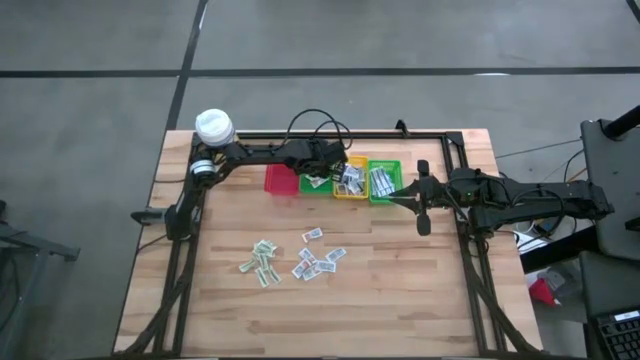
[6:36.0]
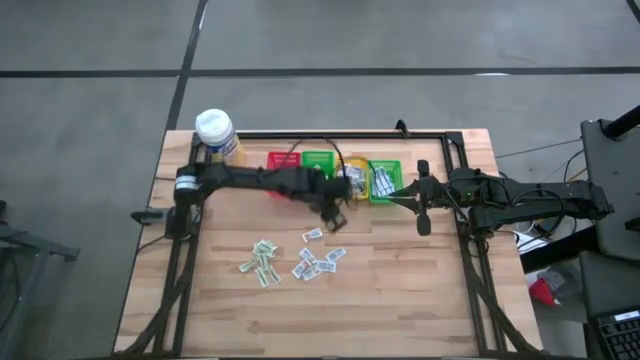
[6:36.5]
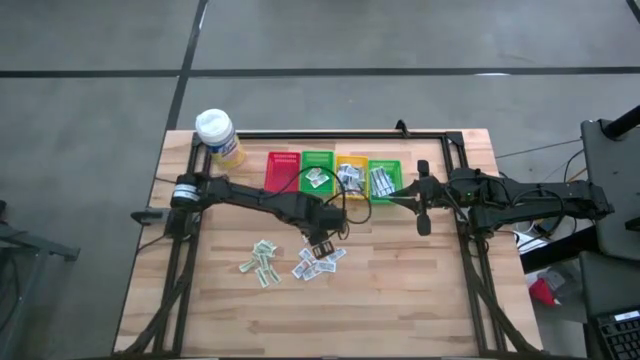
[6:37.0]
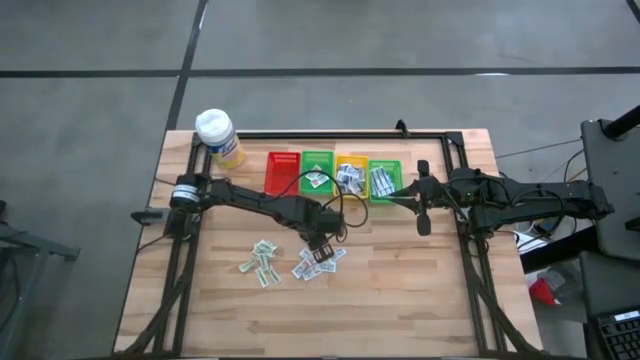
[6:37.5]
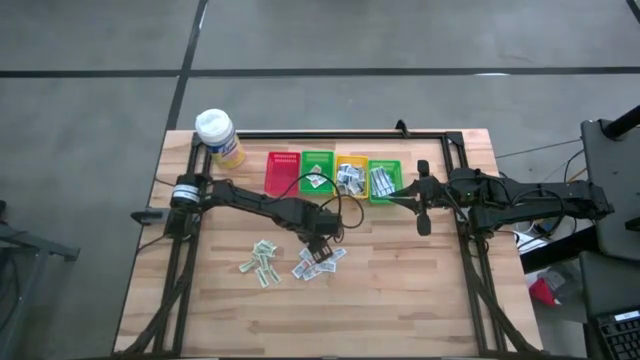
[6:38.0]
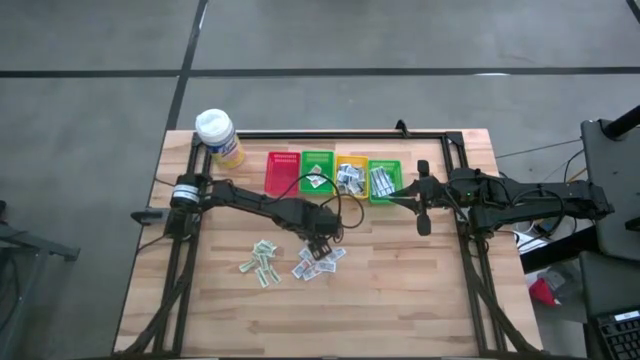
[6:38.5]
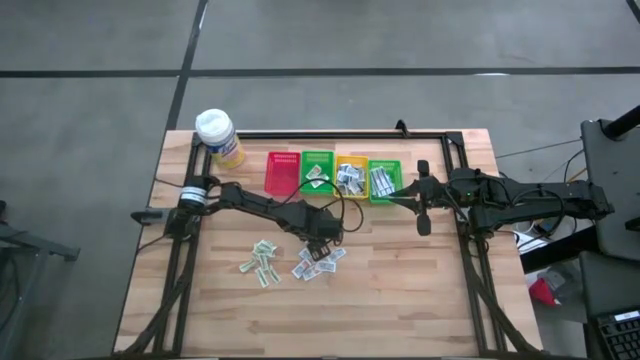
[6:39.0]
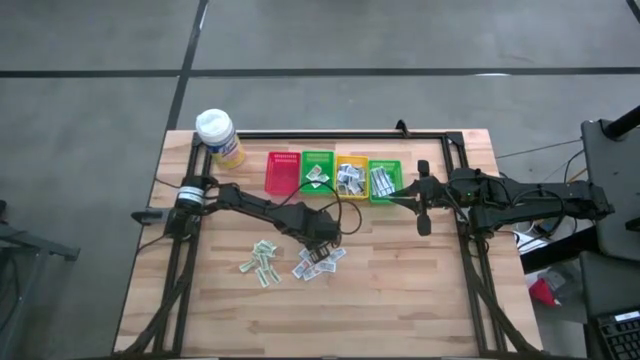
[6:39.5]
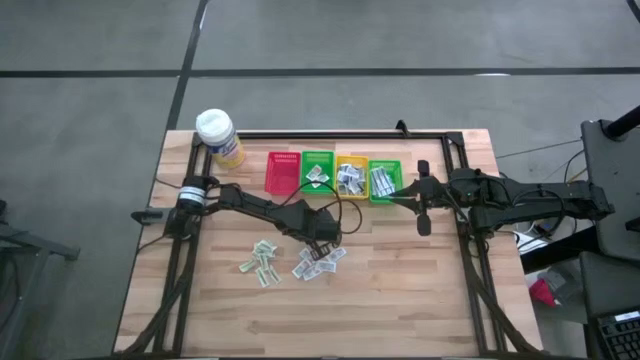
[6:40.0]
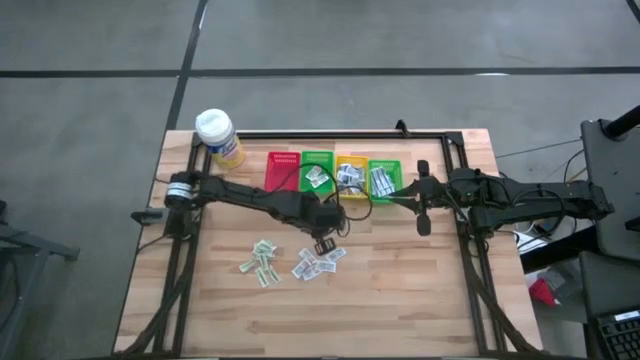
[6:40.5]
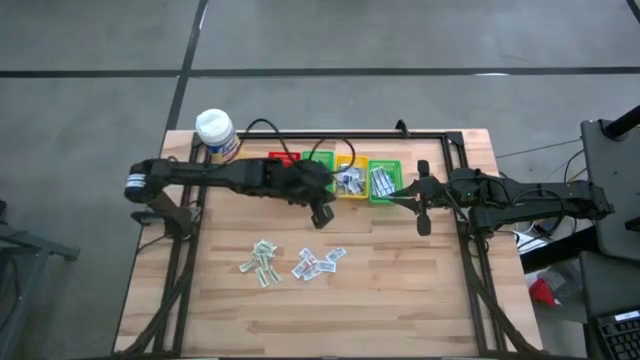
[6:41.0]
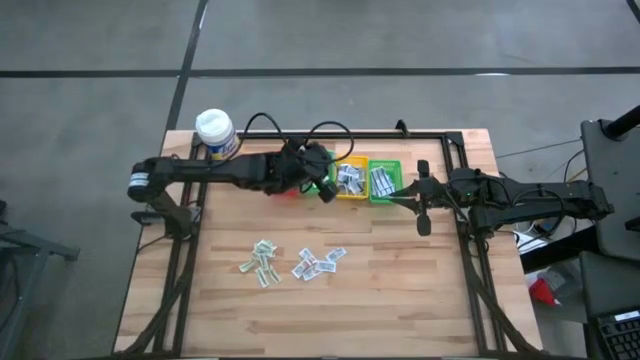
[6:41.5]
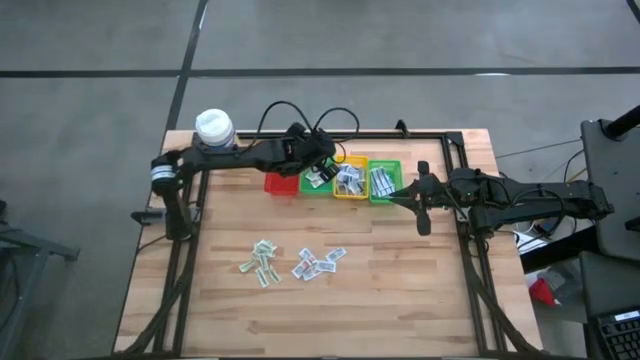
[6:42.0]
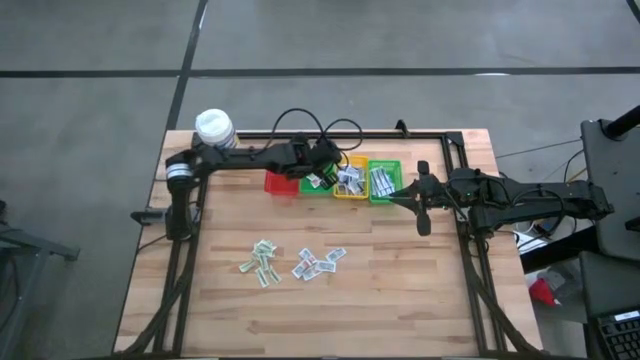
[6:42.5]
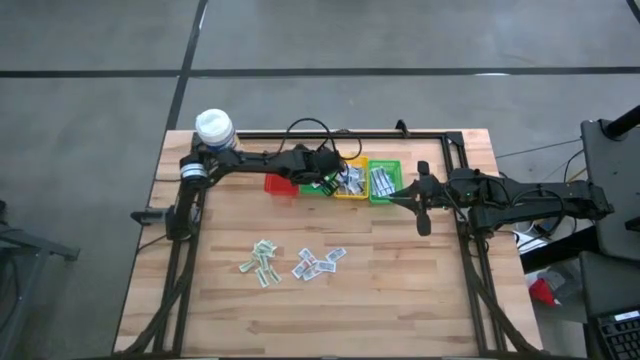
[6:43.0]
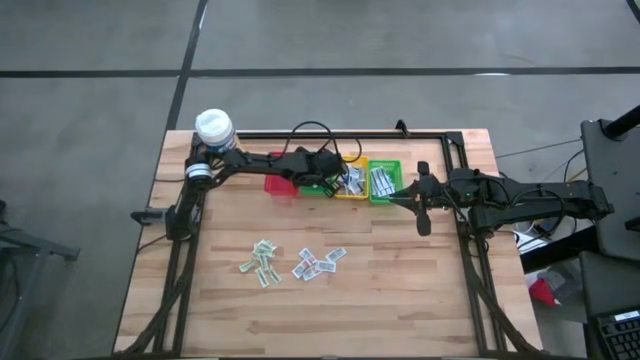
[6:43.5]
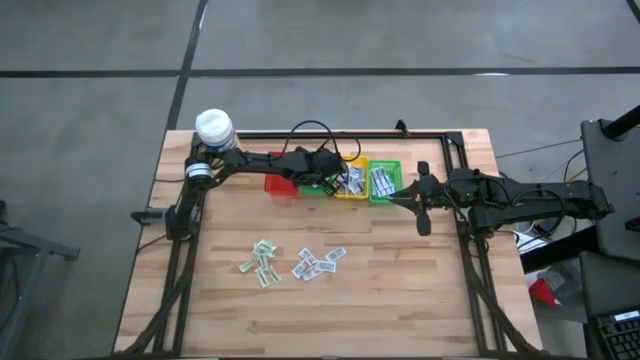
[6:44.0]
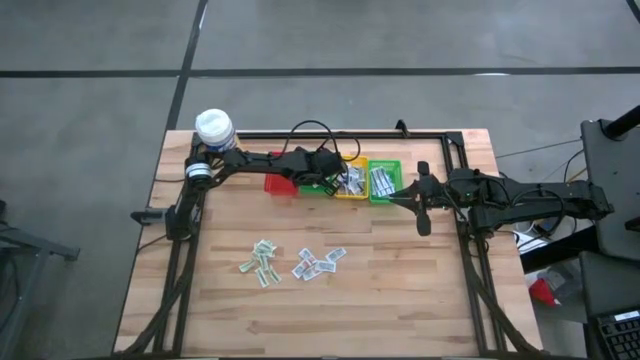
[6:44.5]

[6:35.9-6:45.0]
Task: Pick & Place First Aid Supplies
Put the orange ointment pack into the left green bin

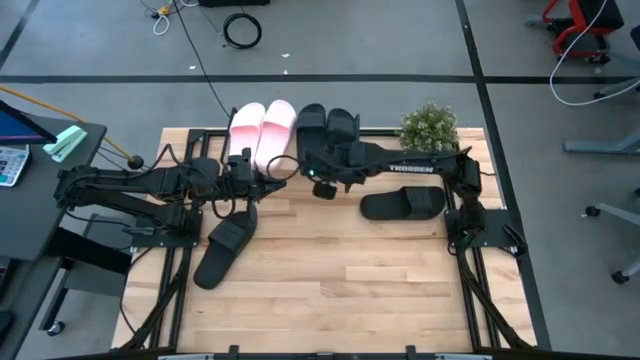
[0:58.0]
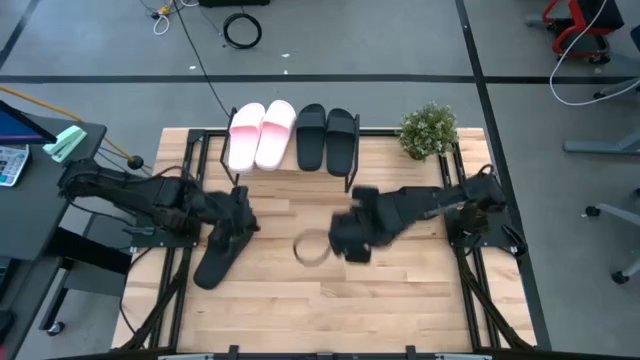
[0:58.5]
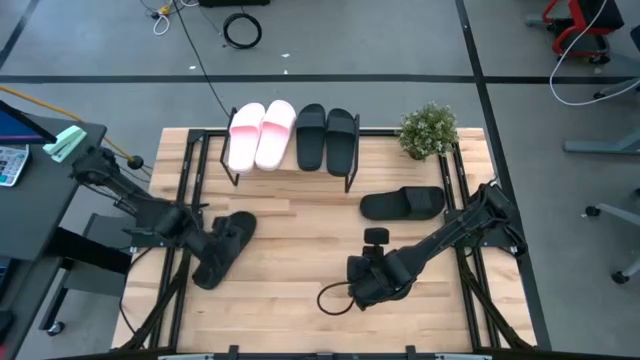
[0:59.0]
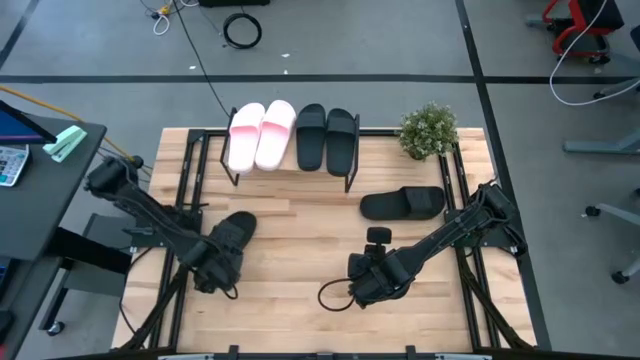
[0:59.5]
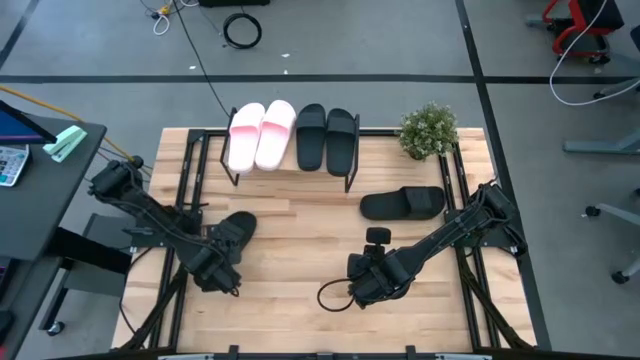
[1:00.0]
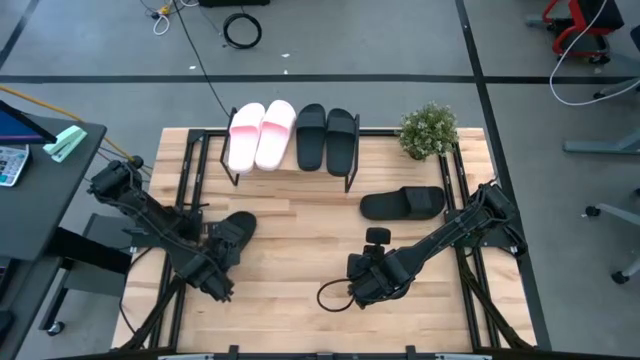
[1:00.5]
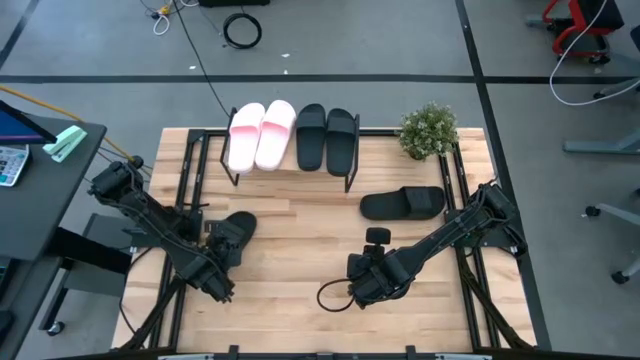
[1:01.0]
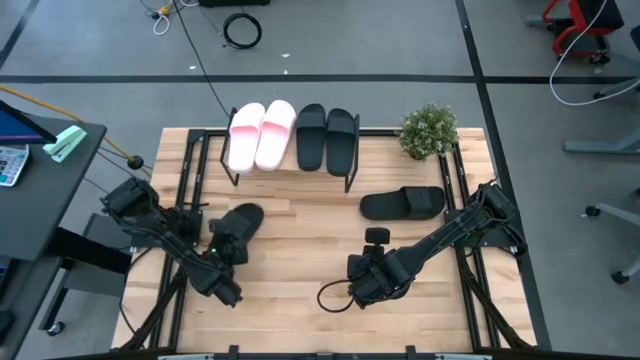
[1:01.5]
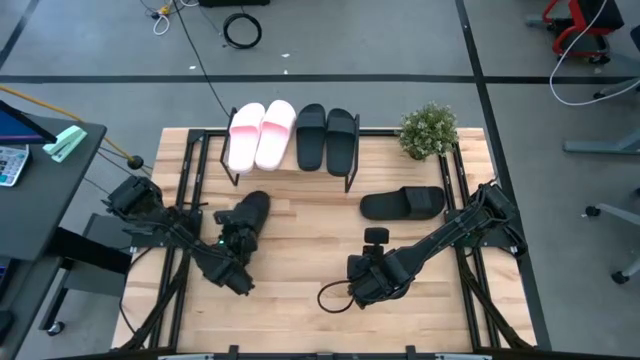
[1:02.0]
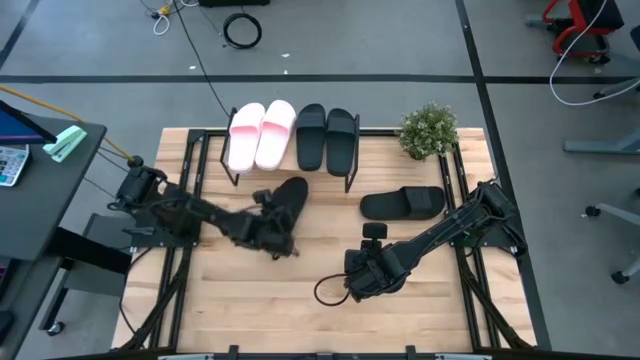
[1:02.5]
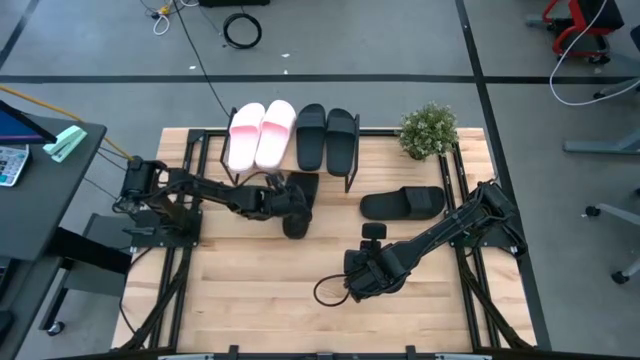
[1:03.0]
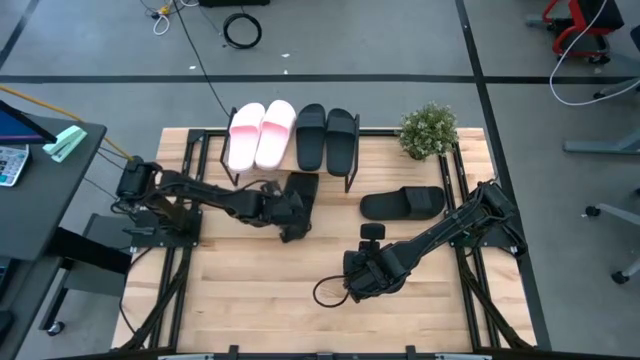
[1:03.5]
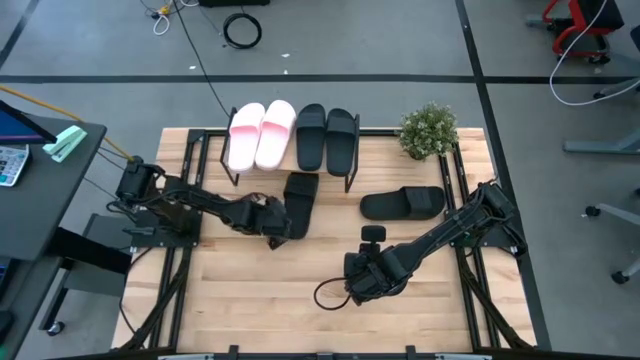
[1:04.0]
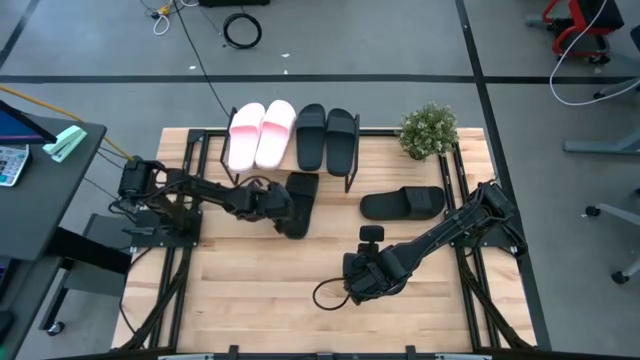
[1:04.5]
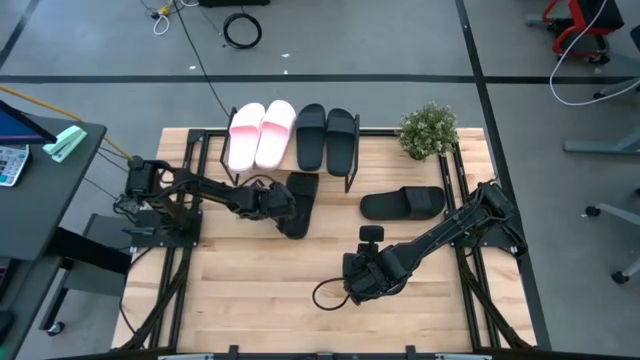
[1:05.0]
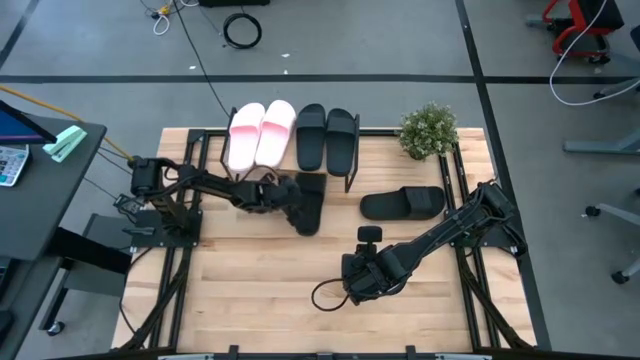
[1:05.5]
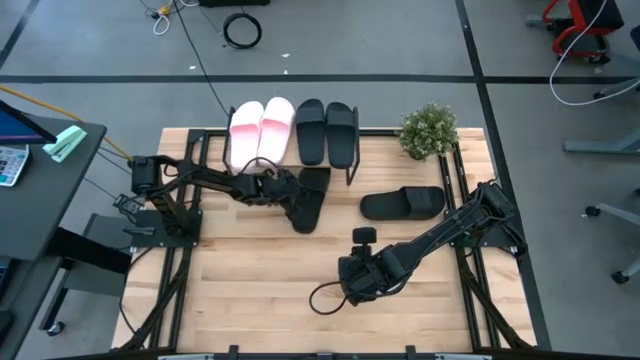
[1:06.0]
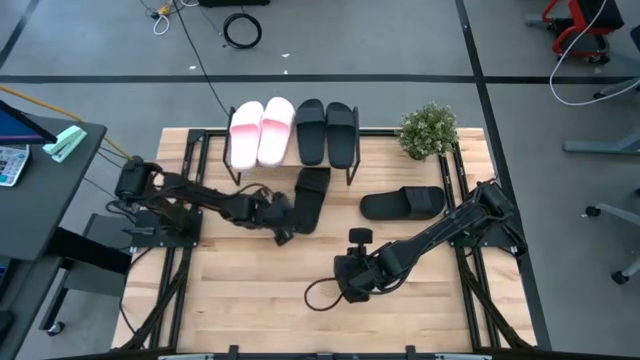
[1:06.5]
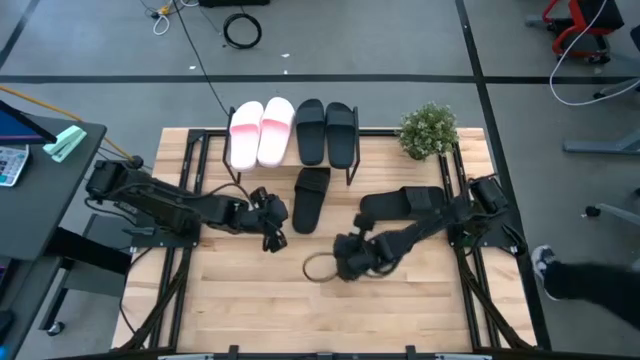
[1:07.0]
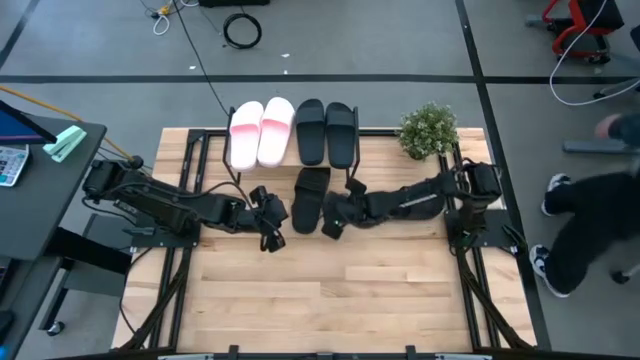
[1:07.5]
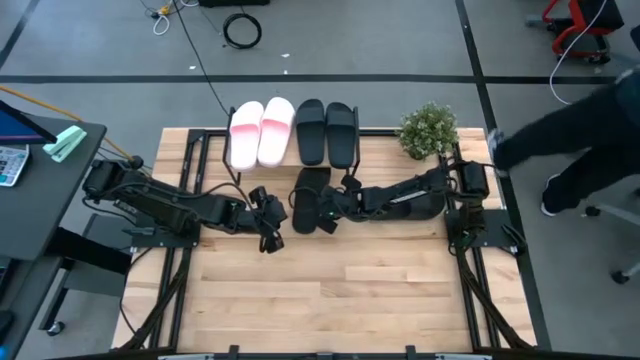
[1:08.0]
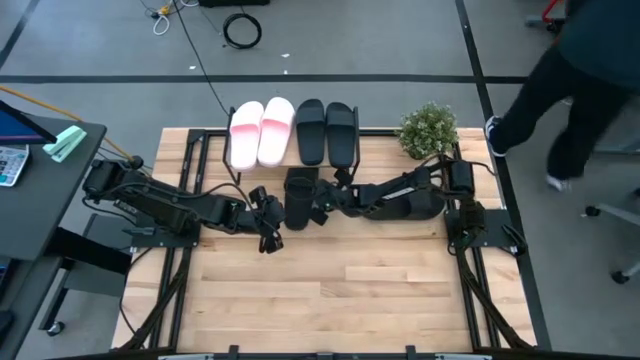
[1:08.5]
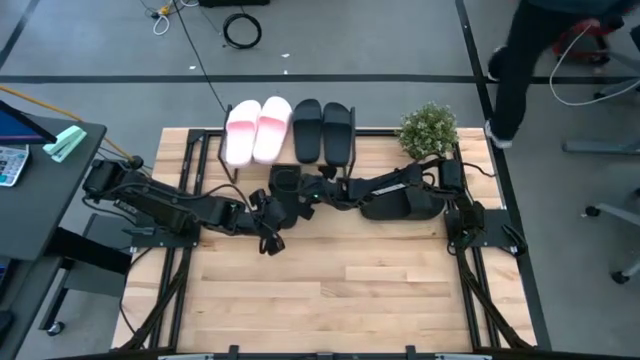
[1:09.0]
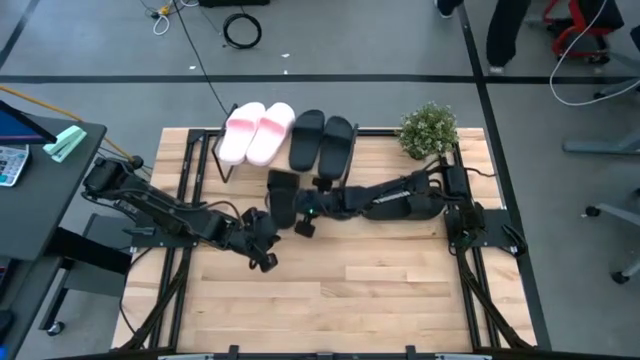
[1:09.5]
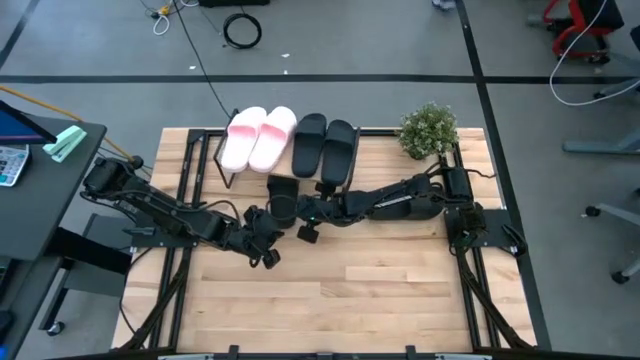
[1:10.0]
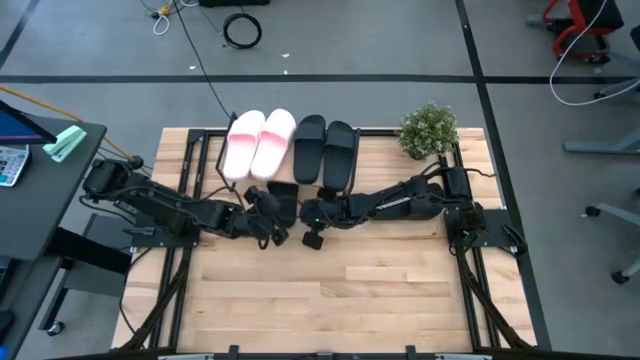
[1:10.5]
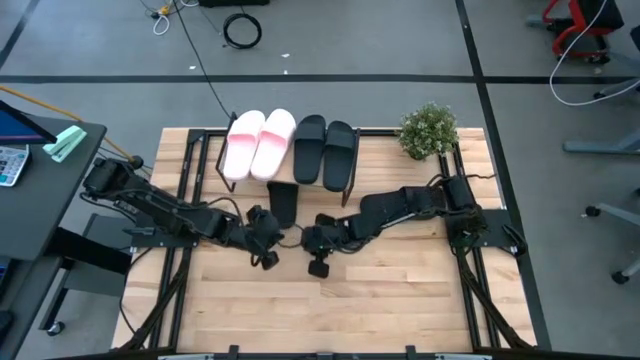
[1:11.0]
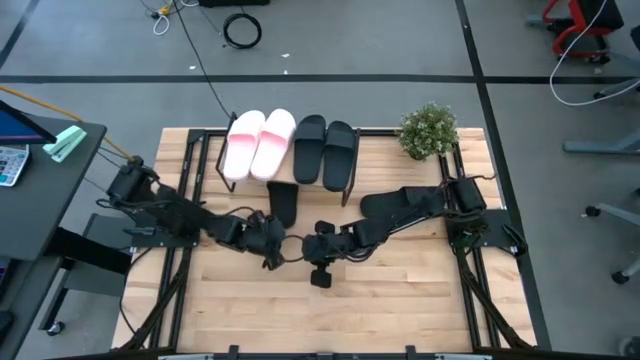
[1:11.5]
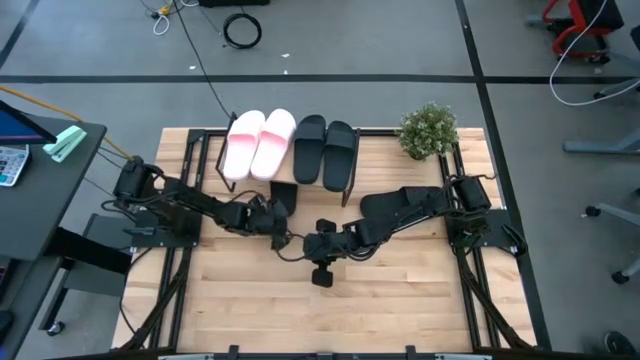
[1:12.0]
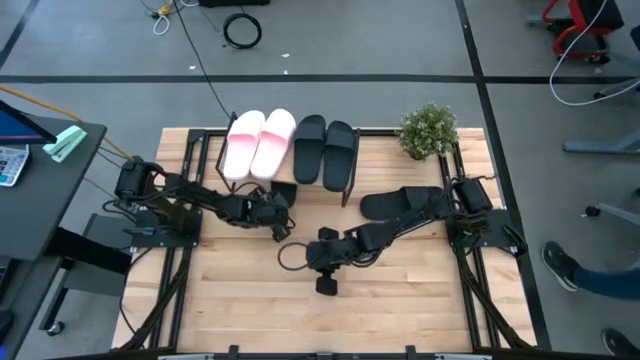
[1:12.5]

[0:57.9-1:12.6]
Task: Pick and place slides into the shelf
Put the black slide under the shelf
